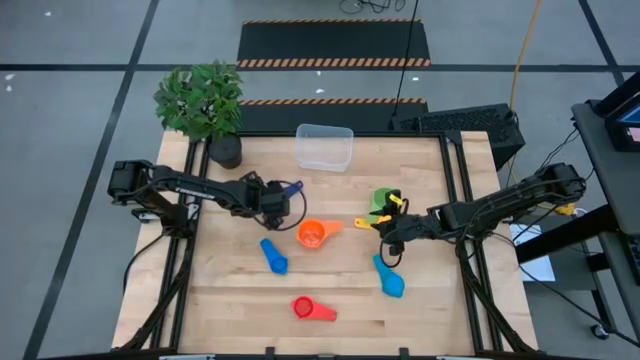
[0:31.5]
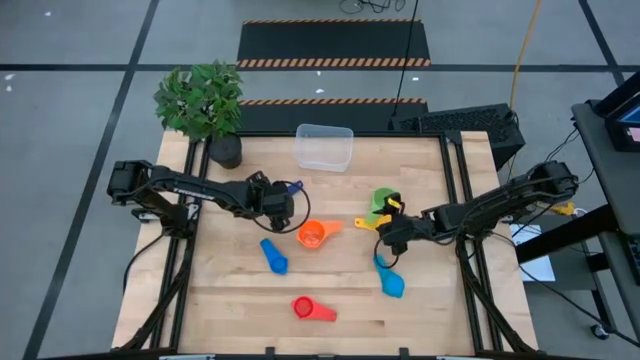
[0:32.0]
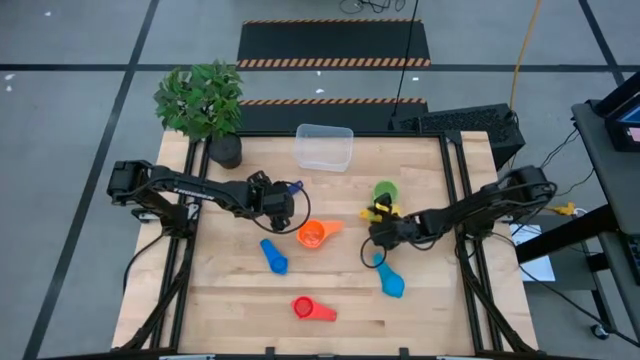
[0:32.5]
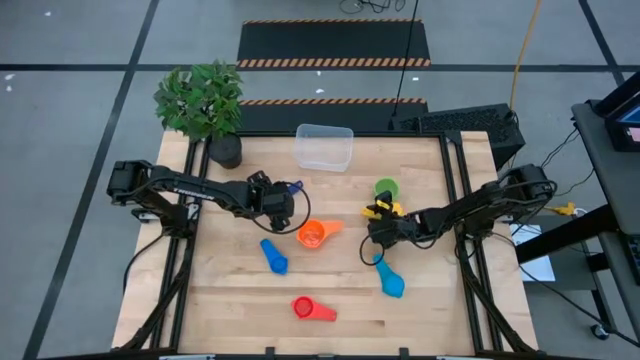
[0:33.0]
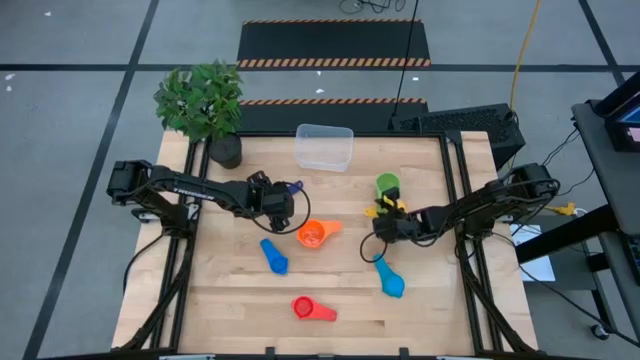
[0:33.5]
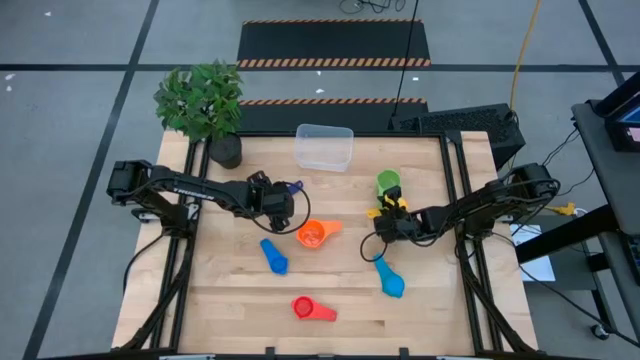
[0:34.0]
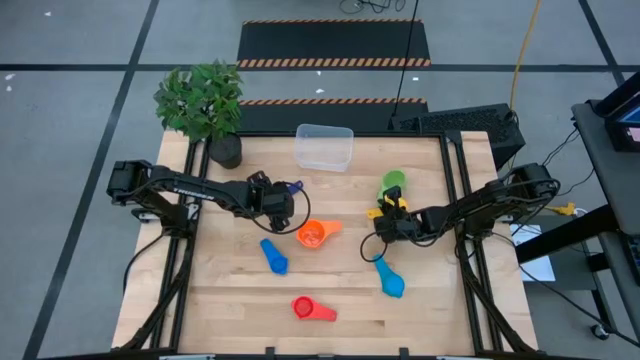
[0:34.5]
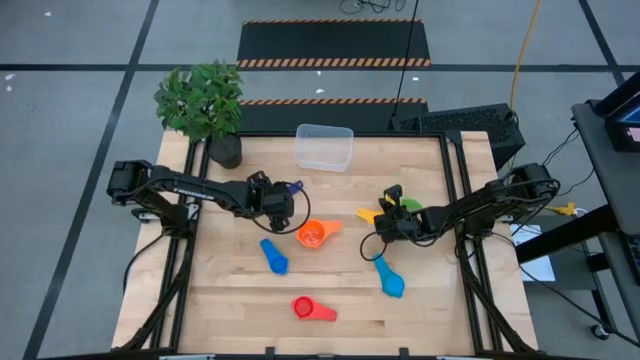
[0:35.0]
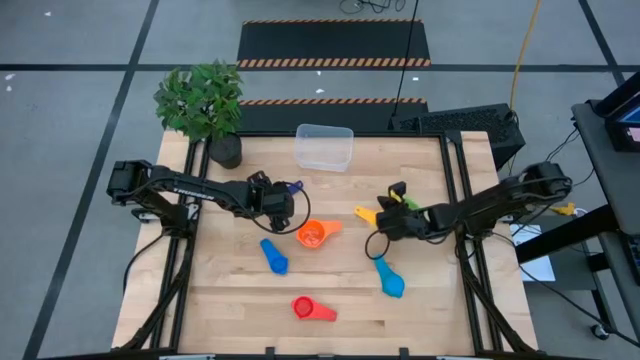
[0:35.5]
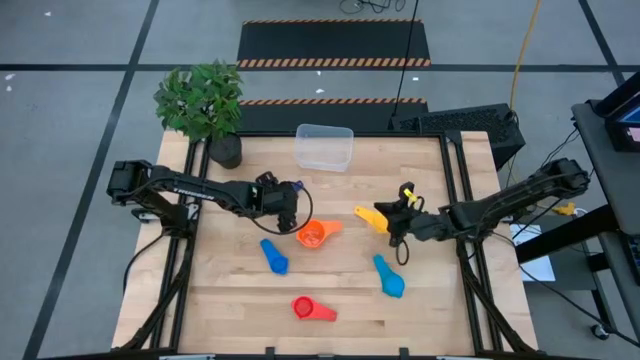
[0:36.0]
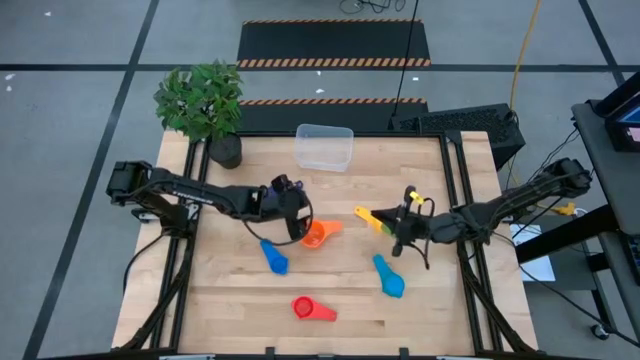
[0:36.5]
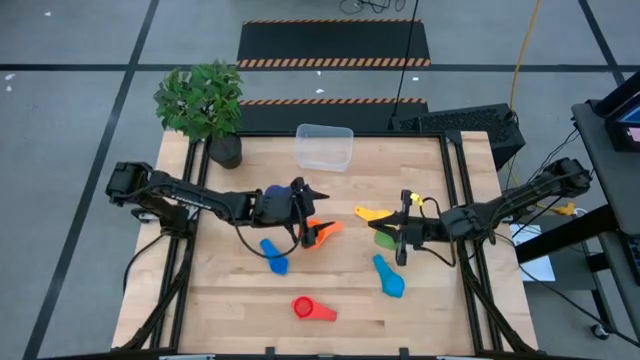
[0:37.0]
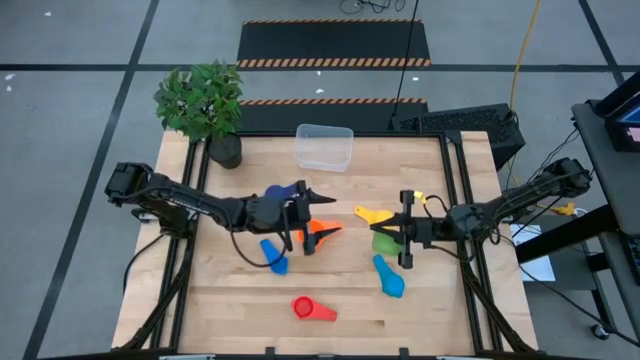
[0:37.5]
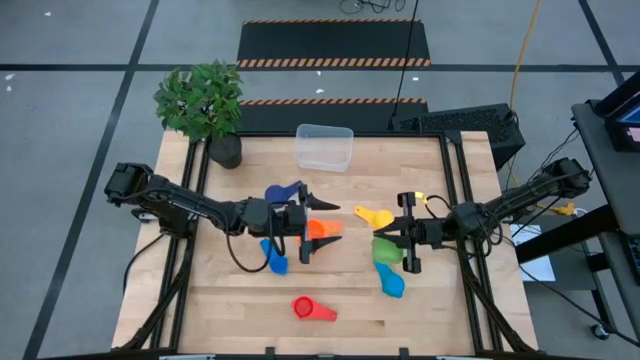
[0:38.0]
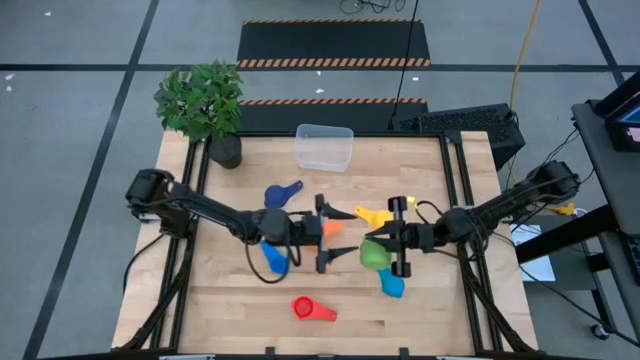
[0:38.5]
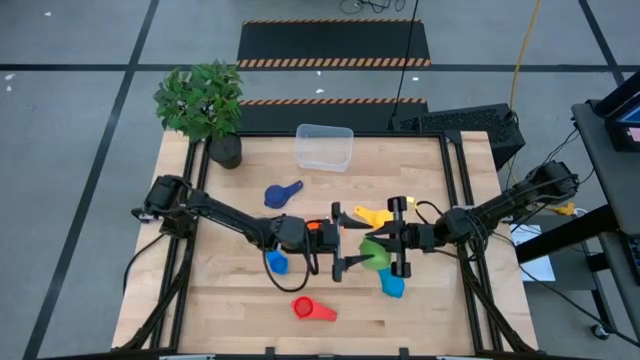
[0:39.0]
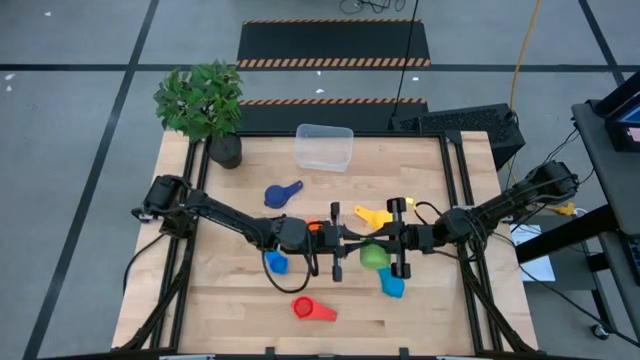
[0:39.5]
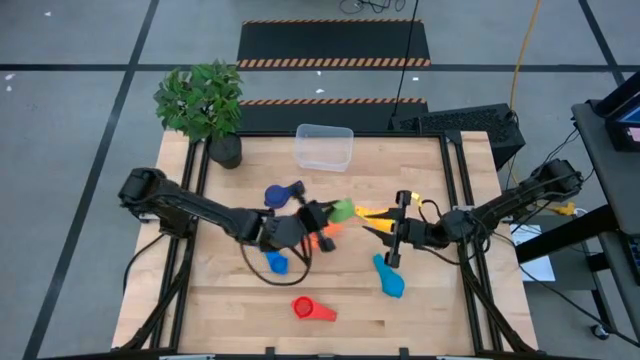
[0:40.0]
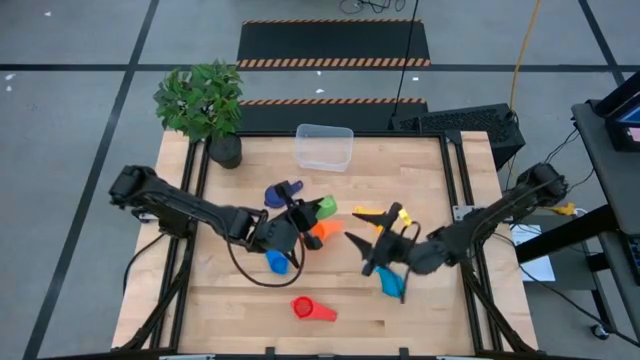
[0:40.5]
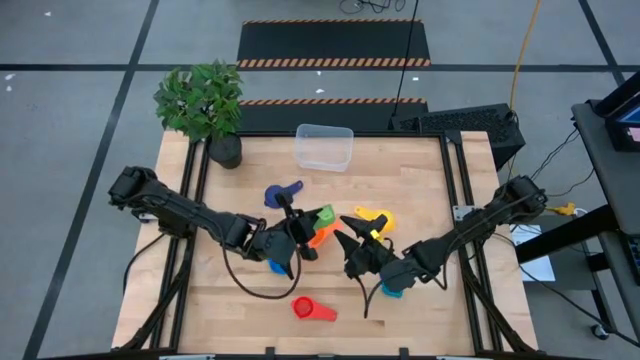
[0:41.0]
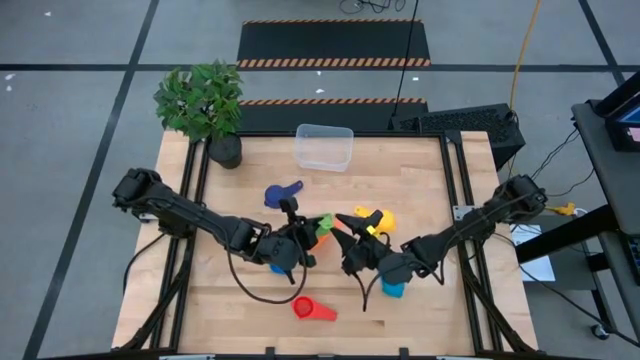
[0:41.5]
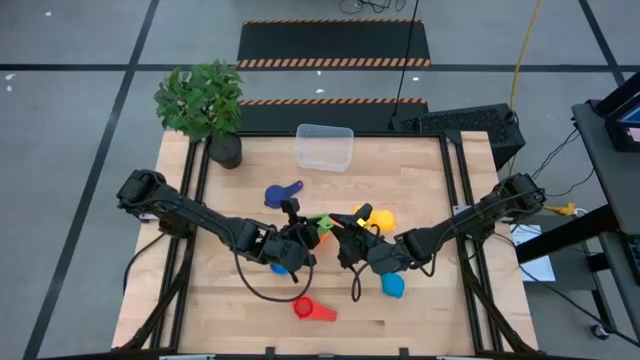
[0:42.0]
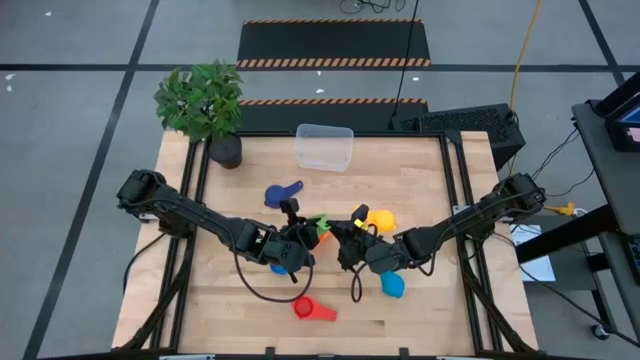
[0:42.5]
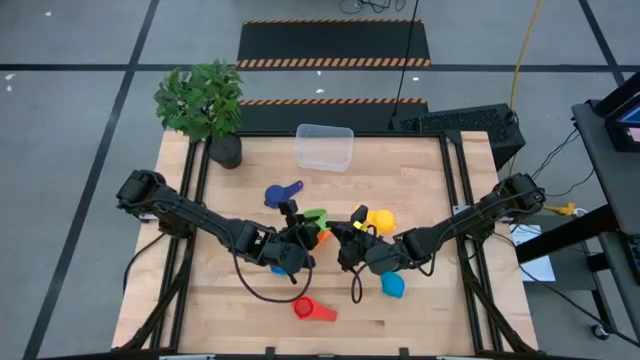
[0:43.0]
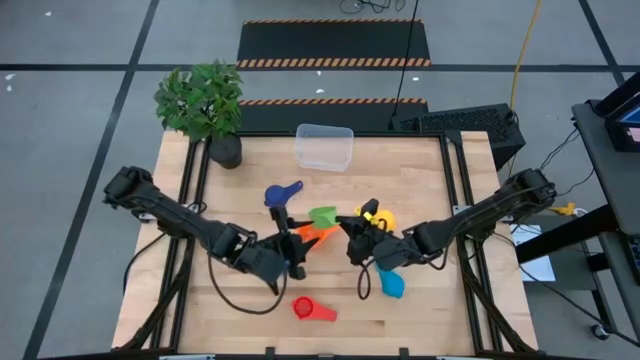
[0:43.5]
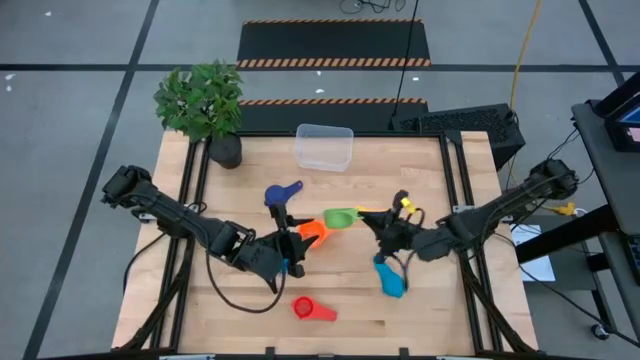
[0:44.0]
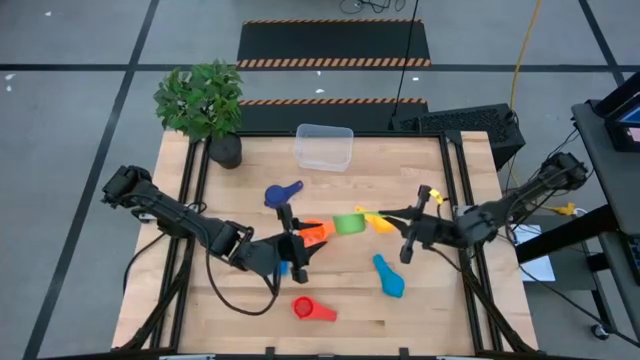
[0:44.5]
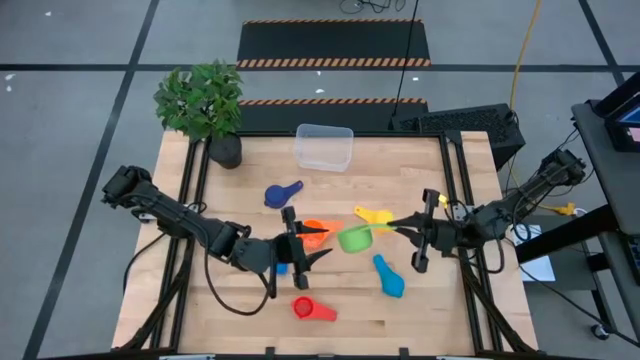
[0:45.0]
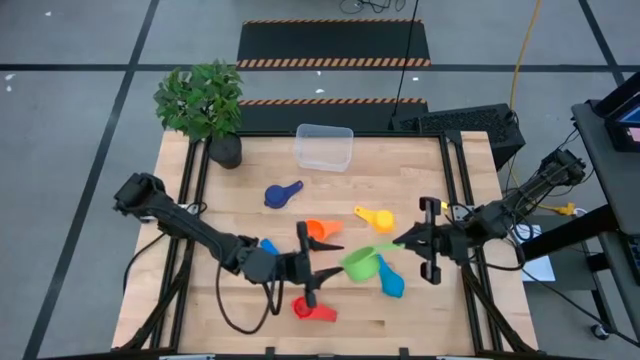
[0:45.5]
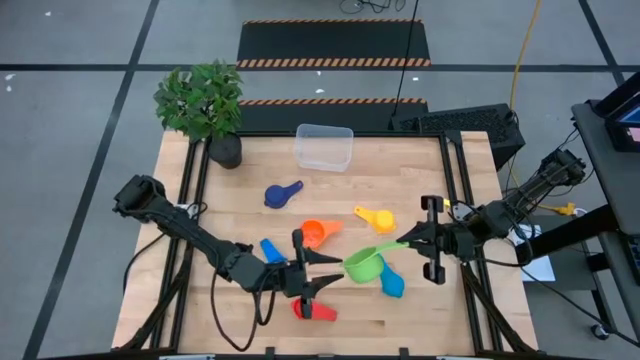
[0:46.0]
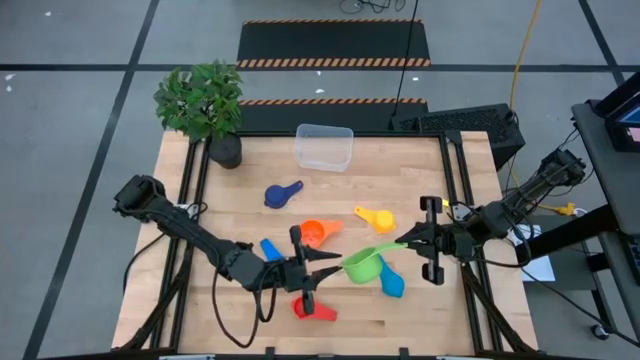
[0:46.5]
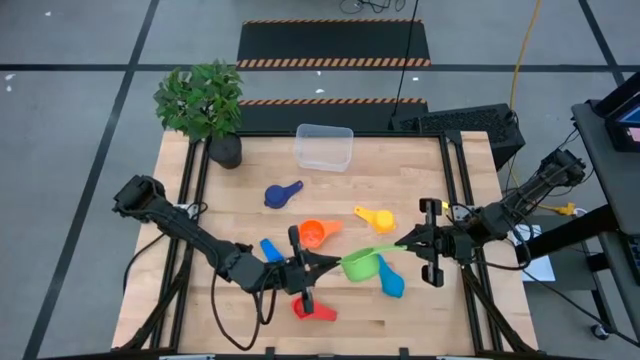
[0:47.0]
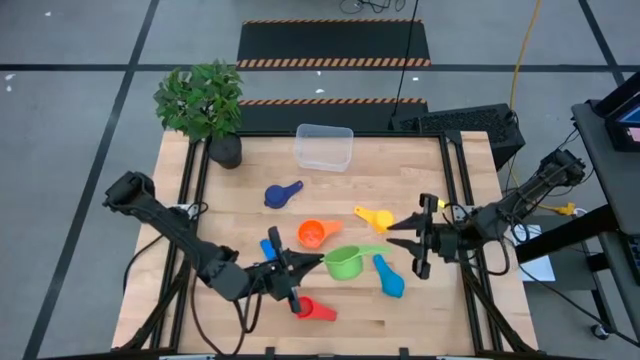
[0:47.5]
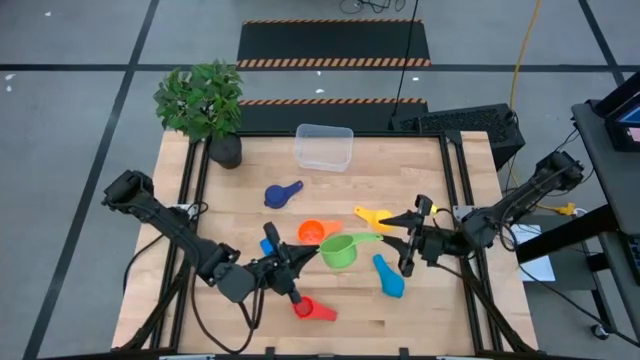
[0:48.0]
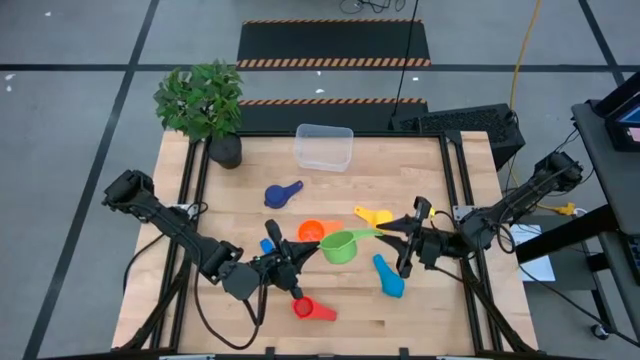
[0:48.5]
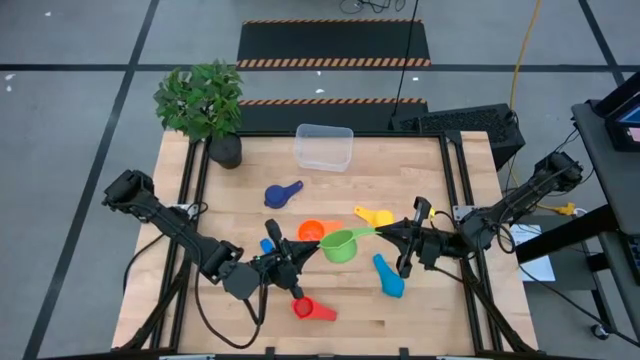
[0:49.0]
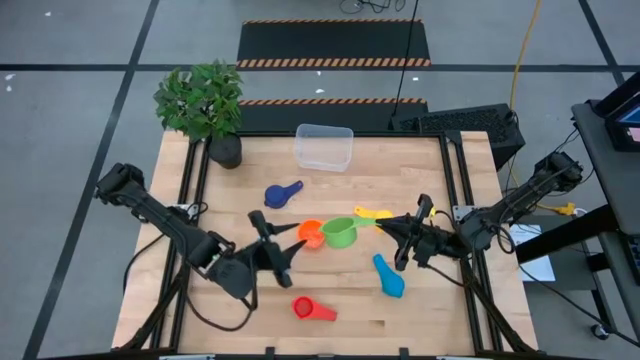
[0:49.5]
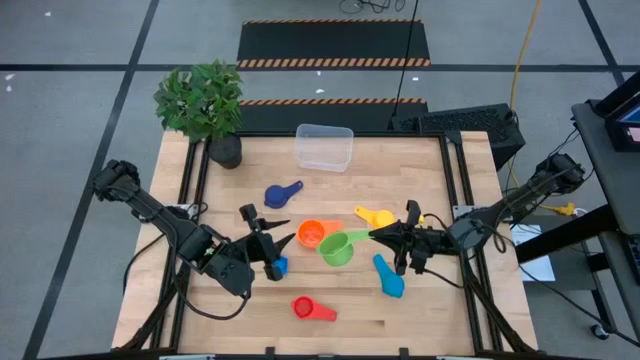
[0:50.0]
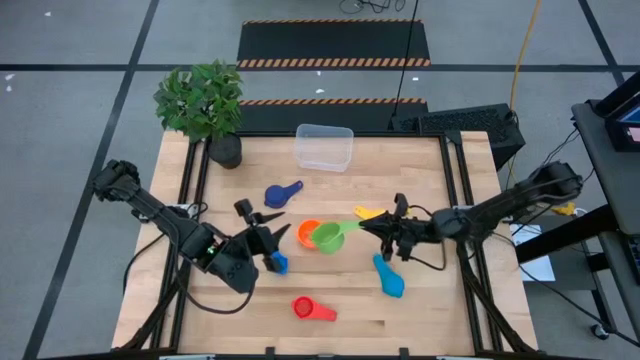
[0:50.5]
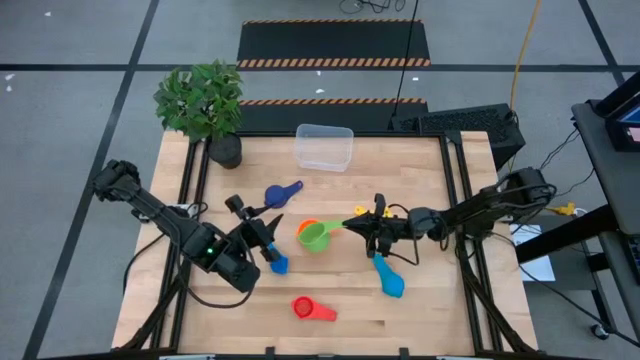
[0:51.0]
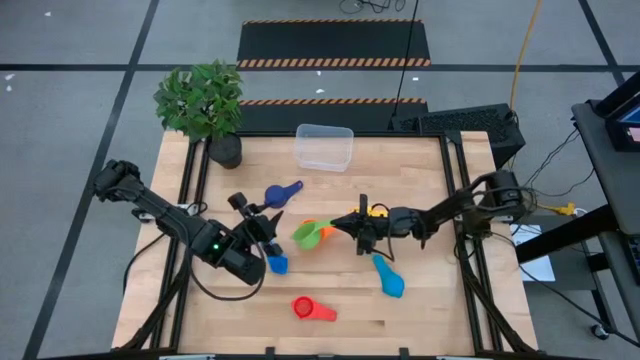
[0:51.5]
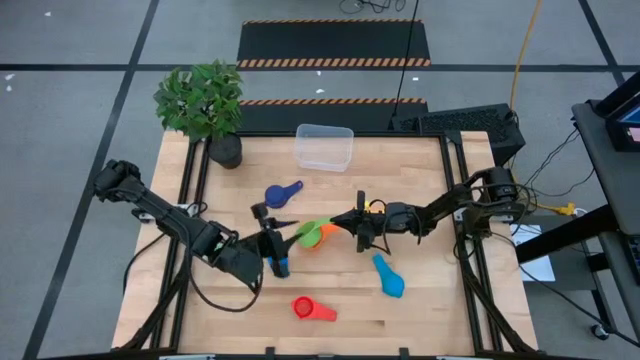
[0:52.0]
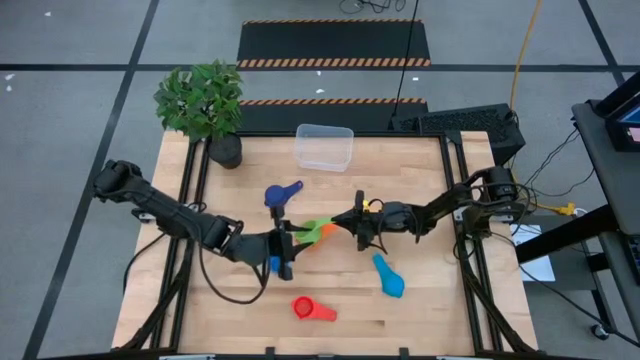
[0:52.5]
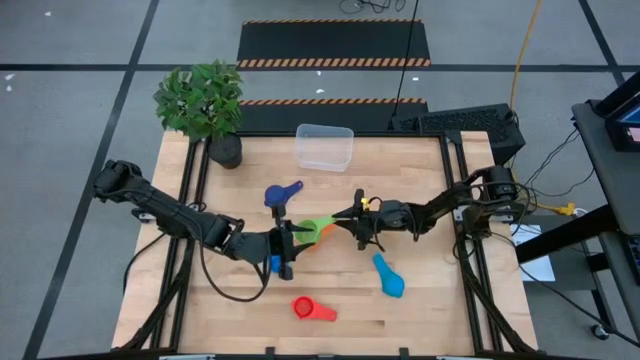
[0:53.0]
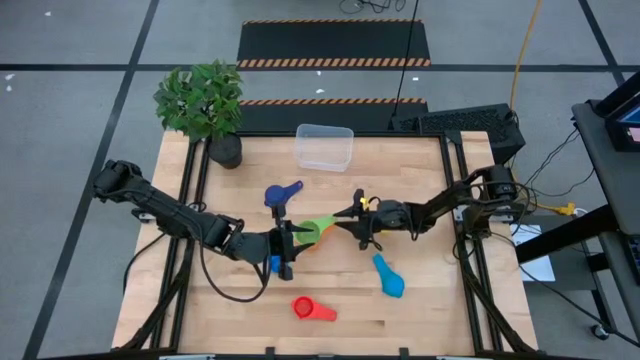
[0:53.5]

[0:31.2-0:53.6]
Task: Nest measuring cups in basket
Stack the green measuring cup on top of the the orange measuring cup
